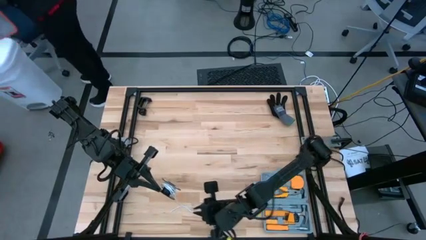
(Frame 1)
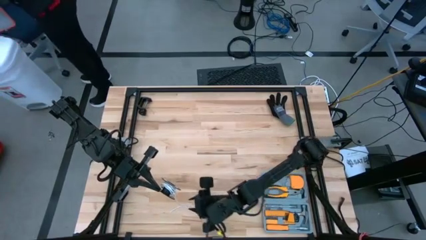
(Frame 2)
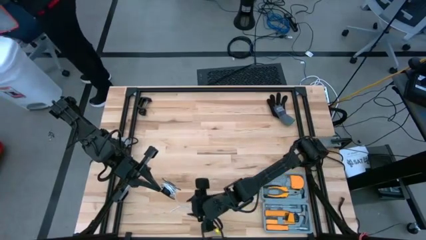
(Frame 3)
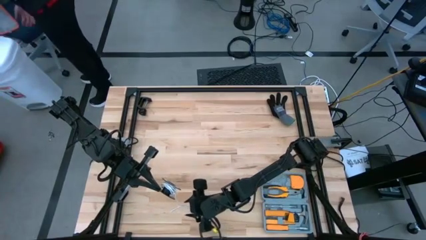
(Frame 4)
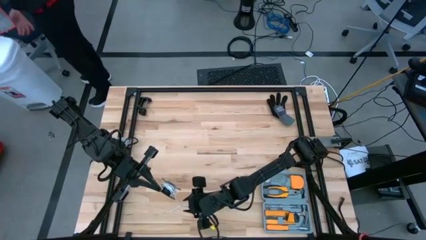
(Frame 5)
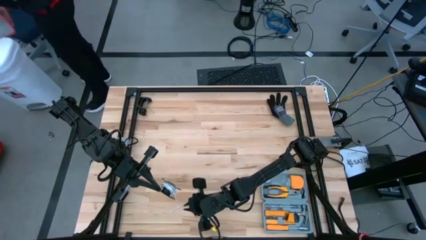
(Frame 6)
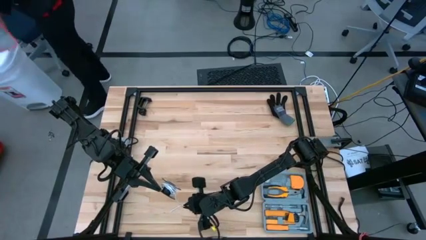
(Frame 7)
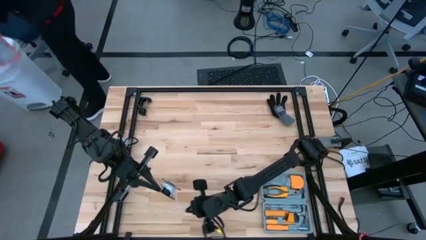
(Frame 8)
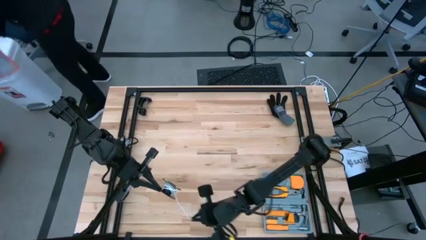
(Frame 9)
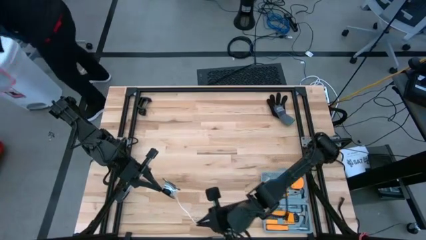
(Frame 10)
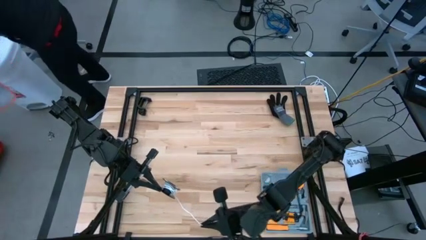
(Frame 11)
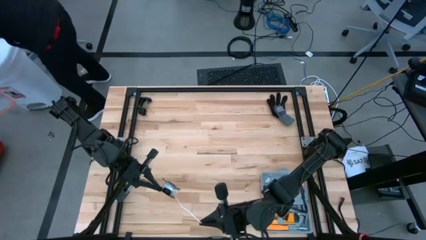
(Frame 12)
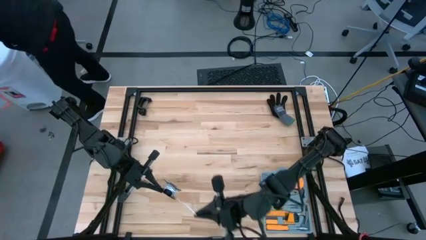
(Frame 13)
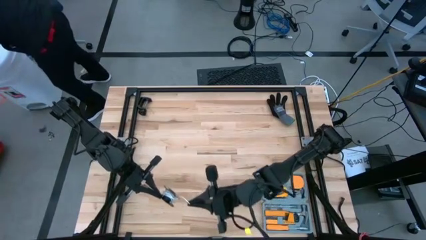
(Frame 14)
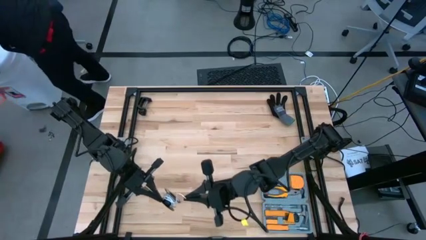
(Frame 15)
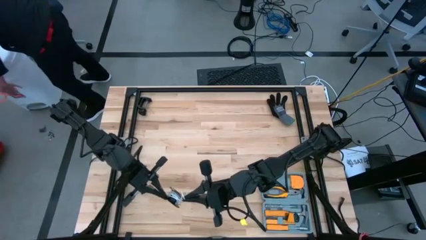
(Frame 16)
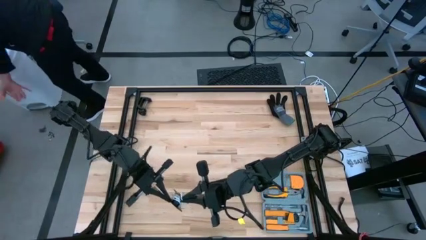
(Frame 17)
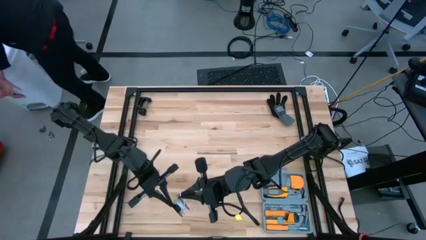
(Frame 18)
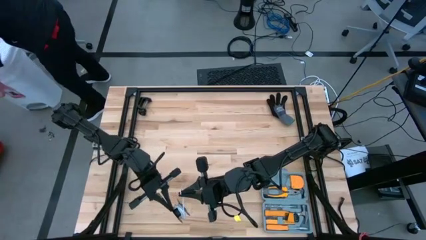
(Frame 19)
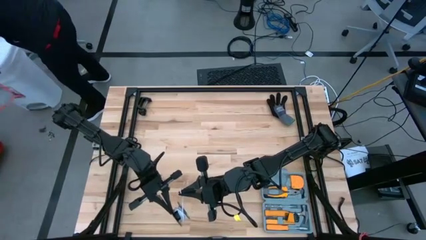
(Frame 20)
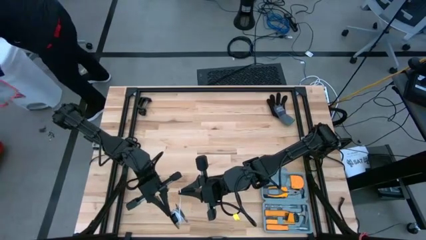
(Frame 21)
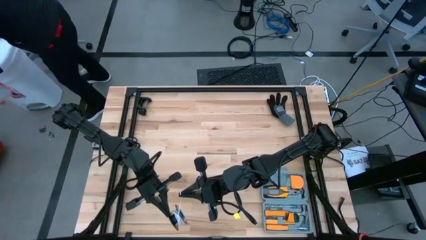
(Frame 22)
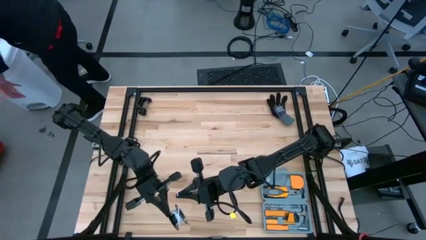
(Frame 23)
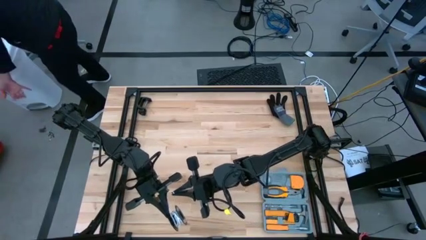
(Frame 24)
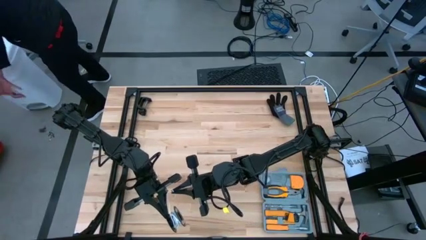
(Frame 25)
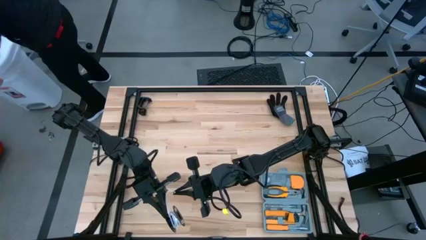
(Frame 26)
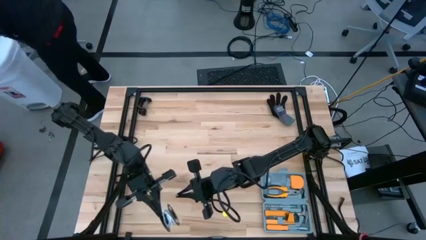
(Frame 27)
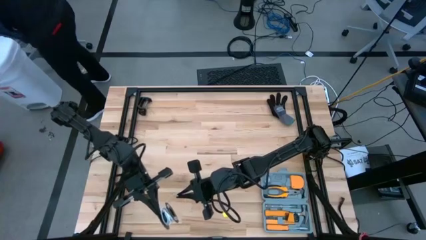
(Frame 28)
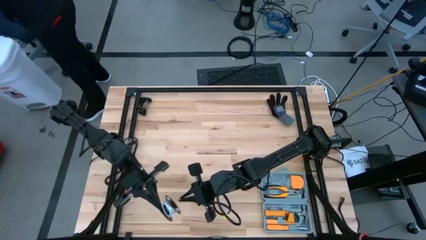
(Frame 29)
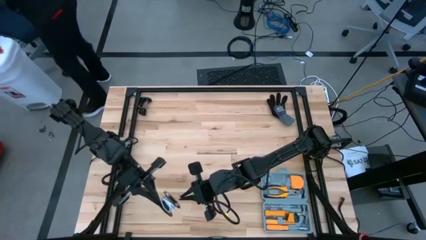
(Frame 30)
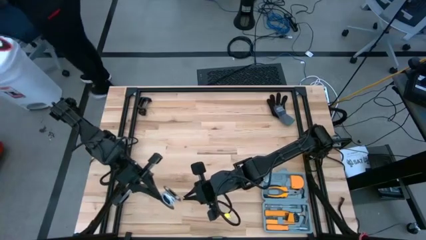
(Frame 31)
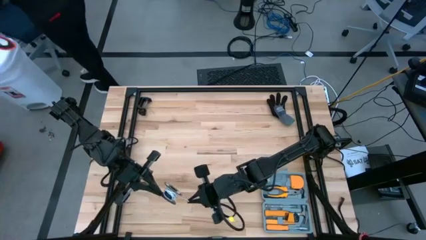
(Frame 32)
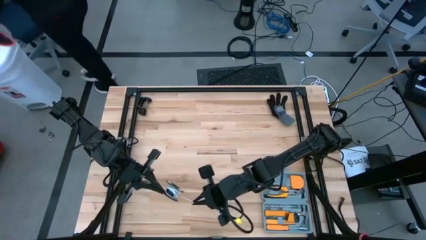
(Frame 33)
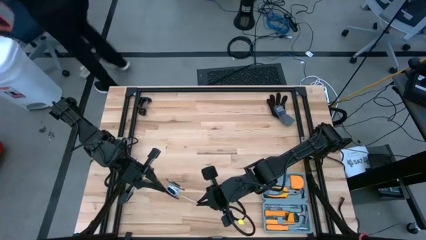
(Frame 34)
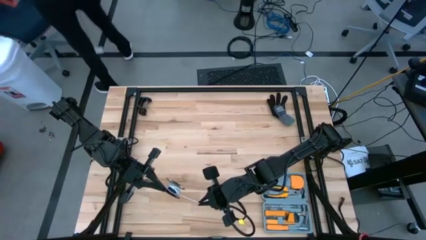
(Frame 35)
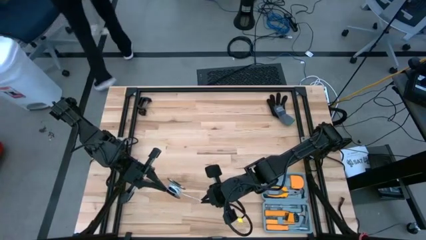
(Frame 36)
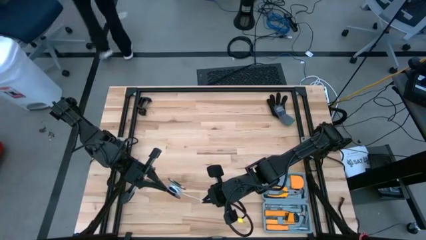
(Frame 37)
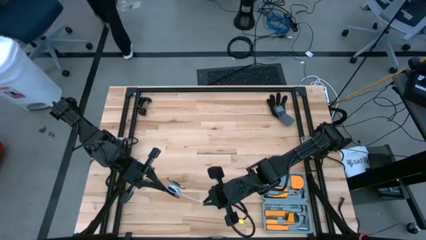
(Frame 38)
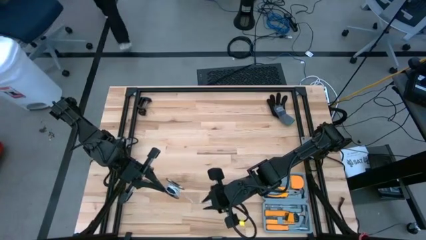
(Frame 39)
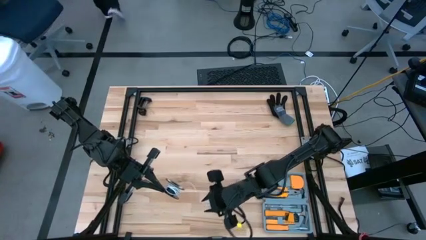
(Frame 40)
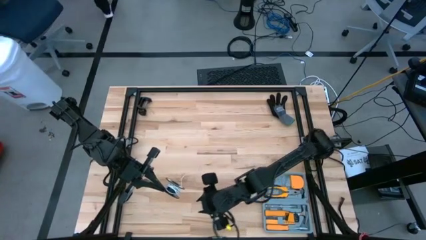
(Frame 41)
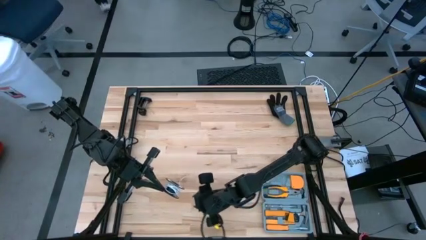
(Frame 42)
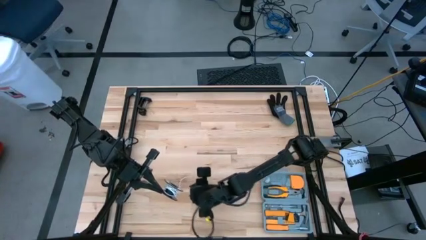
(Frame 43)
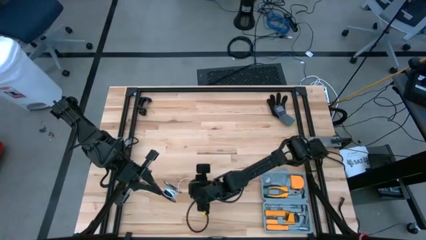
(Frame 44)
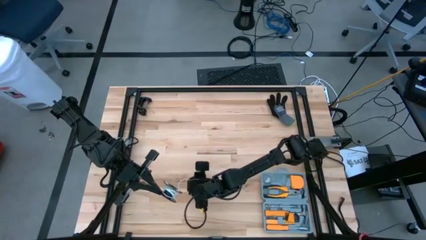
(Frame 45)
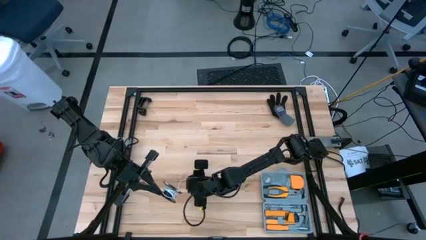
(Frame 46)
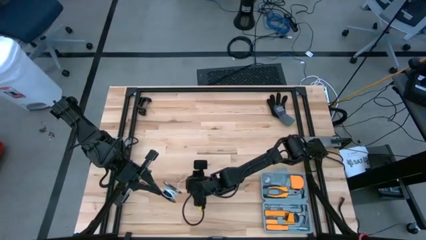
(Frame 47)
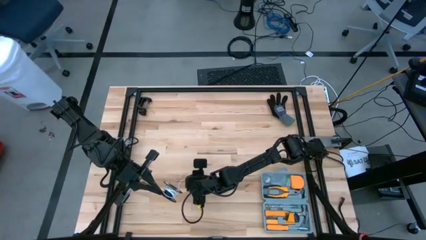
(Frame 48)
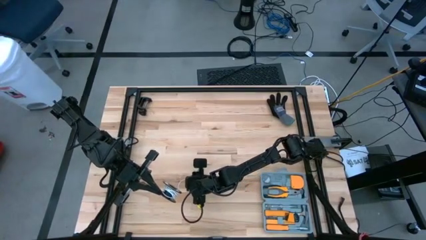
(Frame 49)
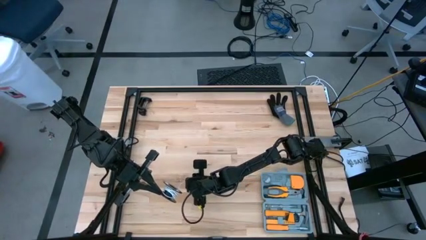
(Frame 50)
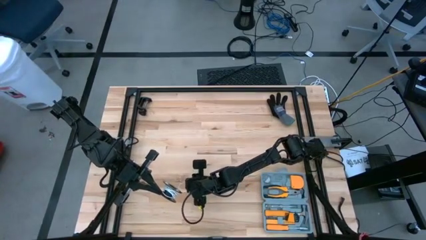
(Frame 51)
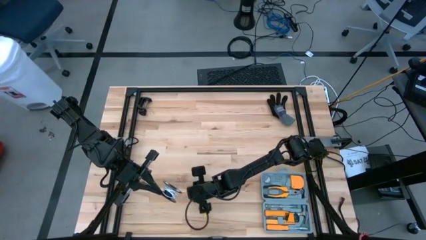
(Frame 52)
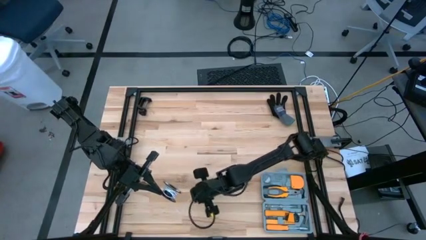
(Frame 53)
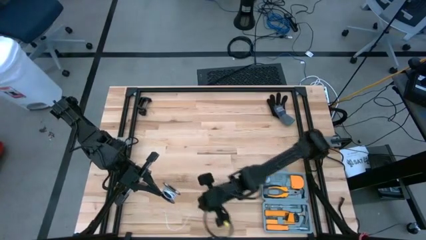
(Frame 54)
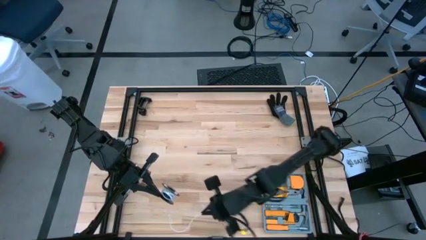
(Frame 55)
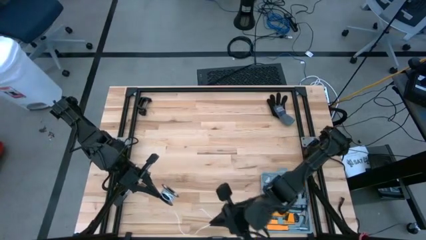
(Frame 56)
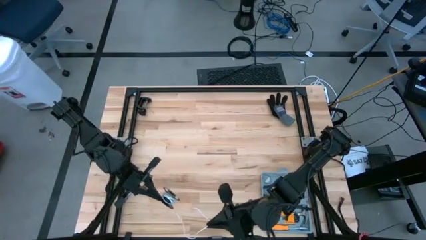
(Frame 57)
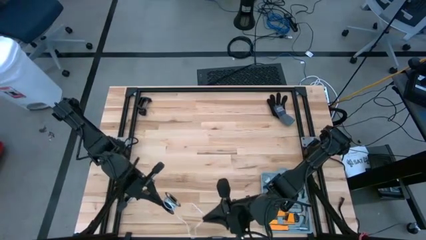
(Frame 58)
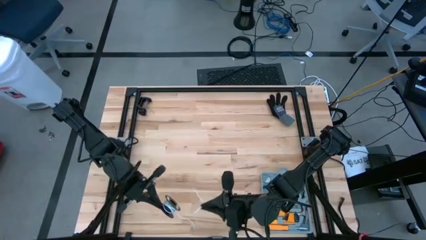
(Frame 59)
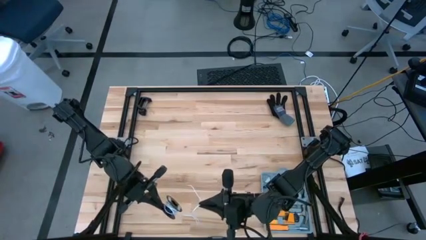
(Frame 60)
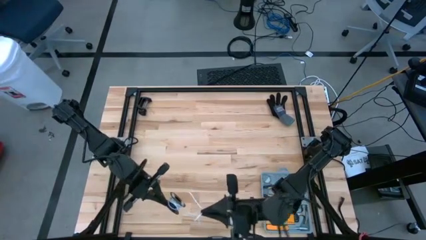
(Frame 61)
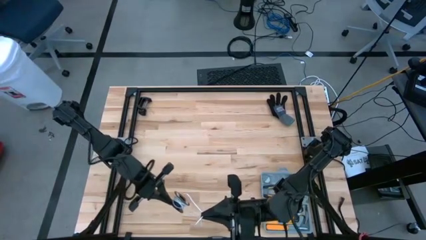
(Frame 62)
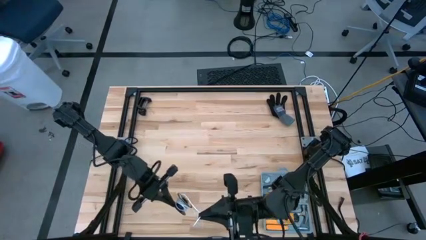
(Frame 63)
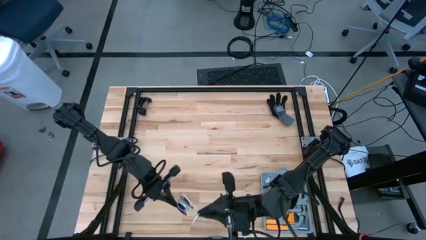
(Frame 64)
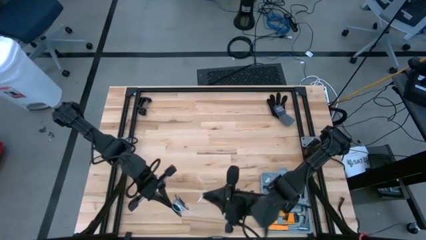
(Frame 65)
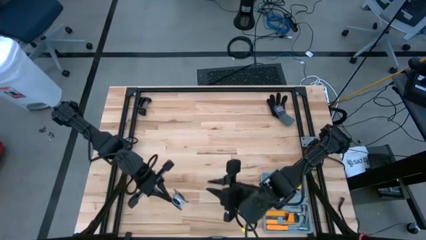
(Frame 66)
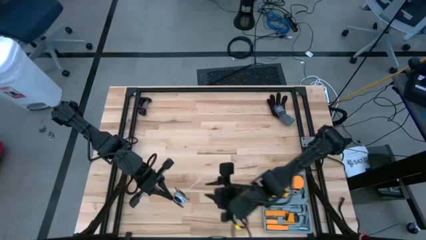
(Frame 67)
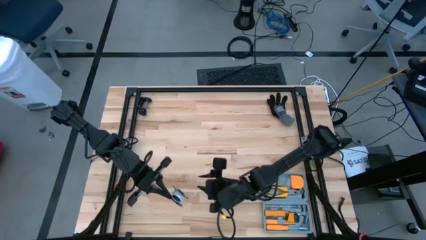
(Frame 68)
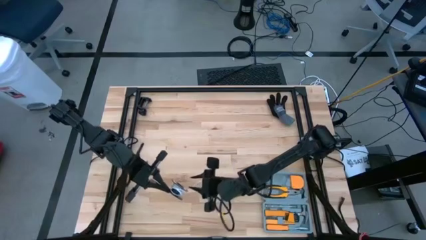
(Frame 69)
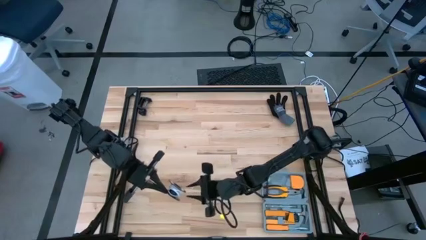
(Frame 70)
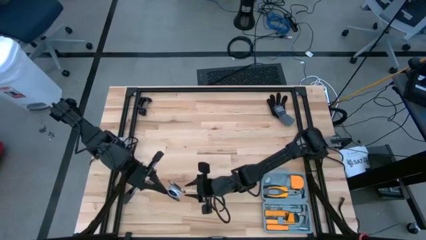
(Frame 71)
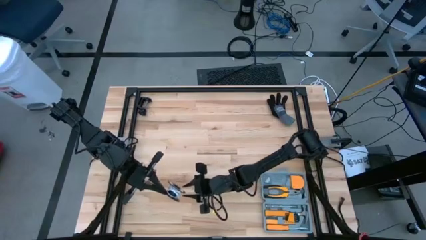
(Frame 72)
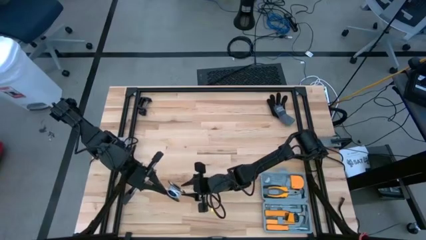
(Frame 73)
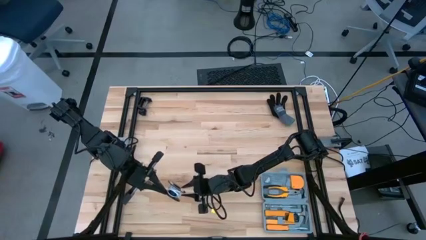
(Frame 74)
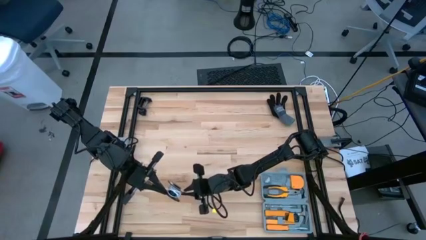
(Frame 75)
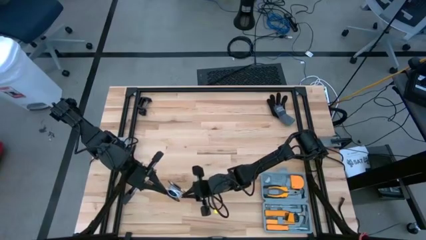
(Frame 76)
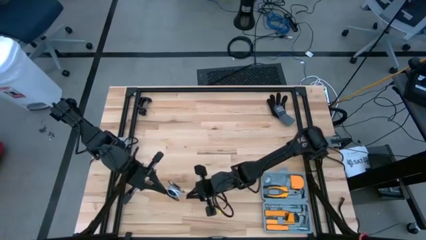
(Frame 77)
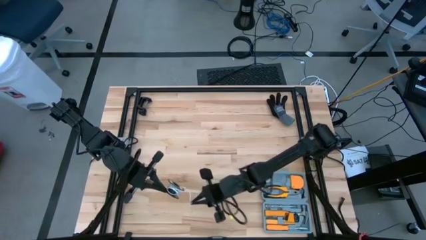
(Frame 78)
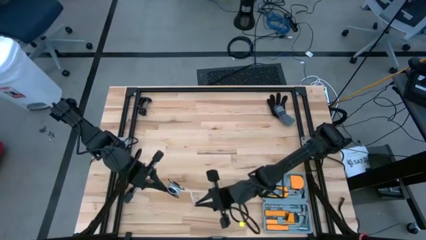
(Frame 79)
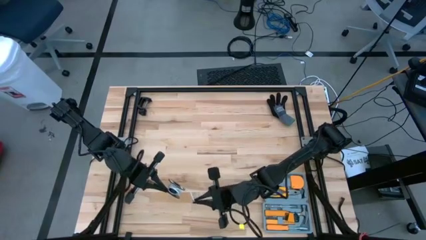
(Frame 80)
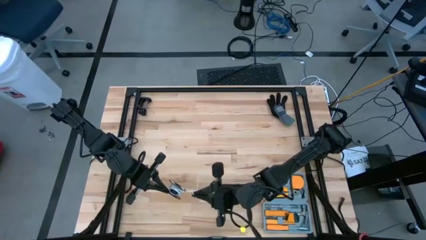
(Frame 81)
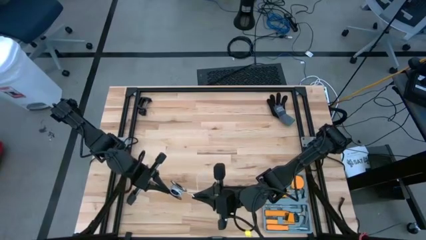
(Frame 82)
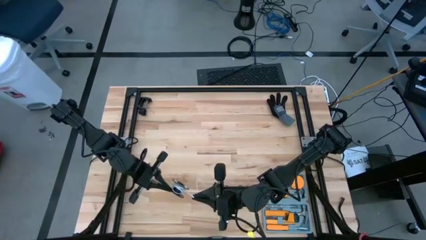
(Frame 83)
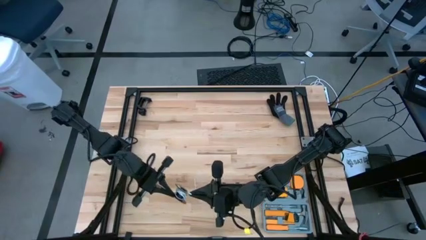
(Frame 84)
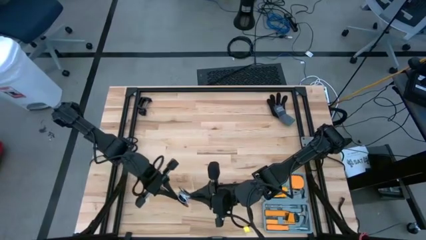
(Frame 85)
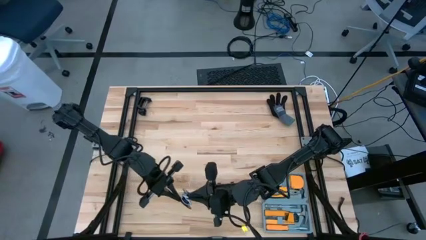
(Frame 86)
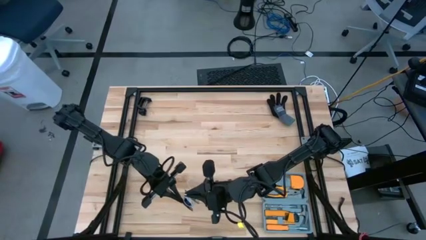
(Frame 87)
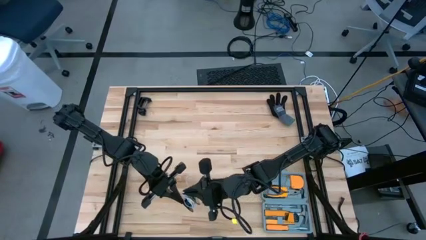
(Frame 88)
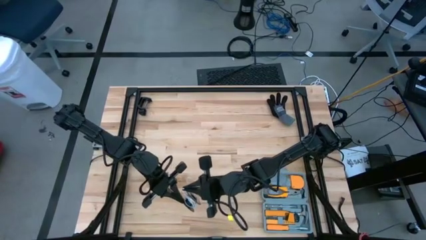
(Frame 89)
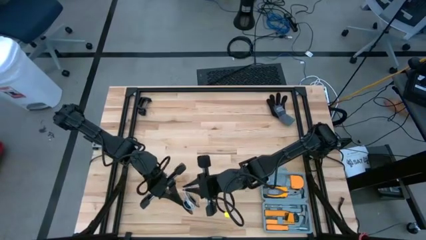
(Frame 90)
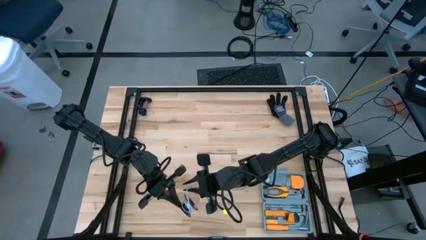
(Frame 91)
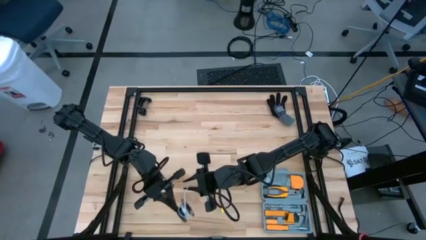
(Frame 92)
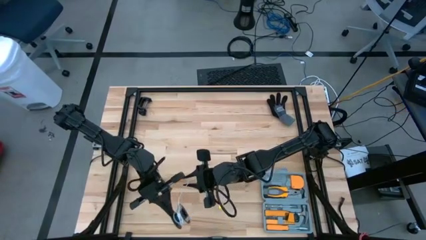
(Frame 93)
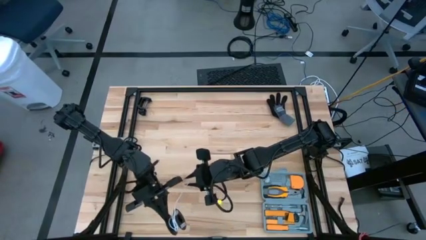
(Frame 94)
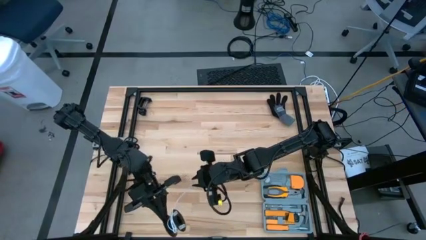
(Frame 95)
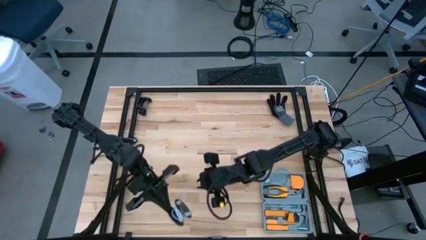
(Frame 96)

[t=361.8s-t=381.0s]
Task: Coil cords
Coil the white cable wire onto the spool
